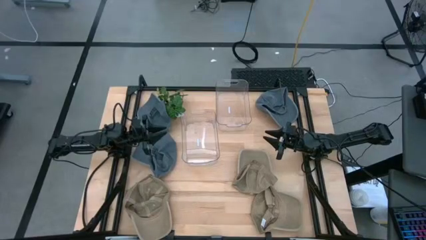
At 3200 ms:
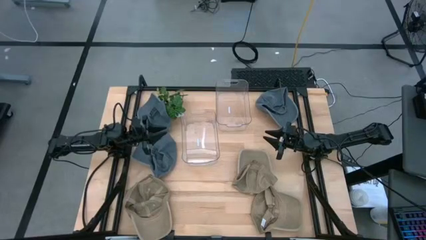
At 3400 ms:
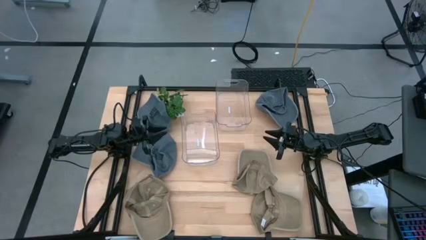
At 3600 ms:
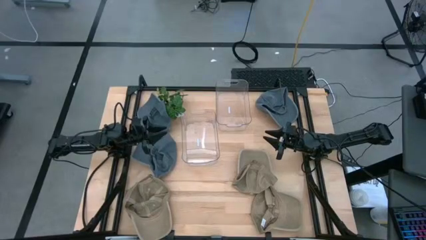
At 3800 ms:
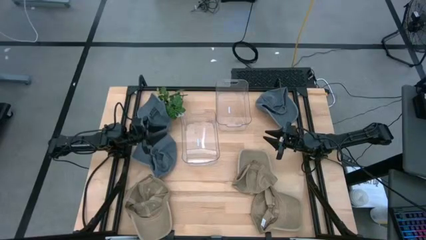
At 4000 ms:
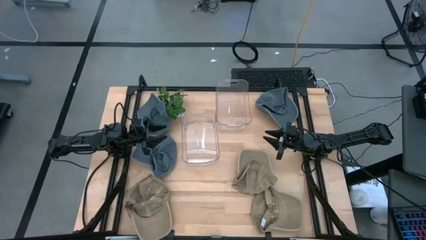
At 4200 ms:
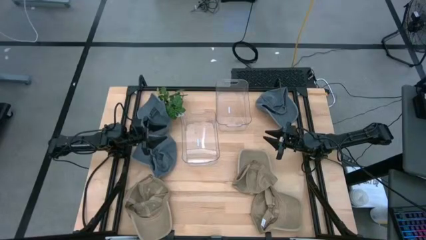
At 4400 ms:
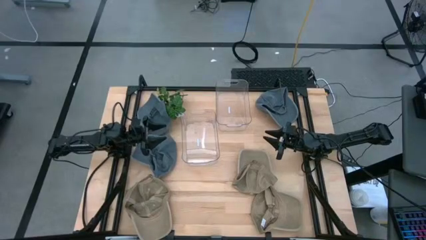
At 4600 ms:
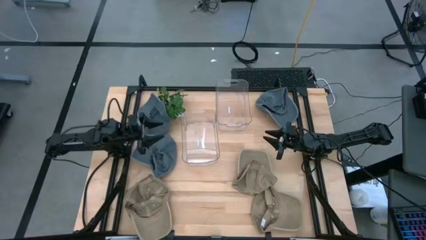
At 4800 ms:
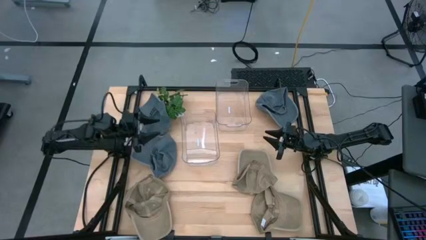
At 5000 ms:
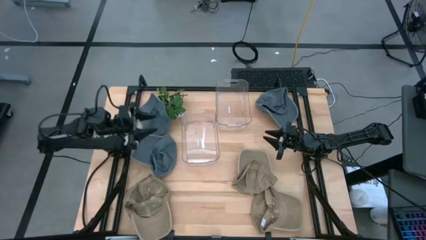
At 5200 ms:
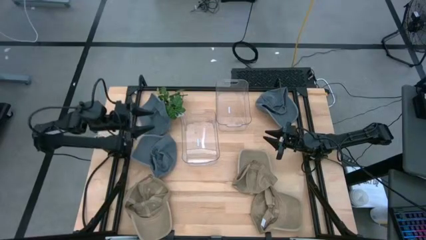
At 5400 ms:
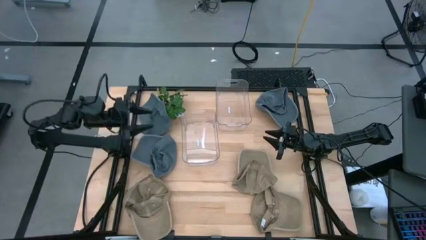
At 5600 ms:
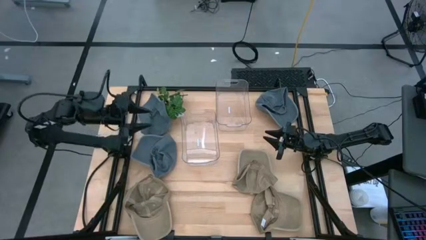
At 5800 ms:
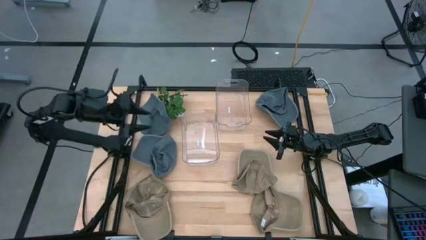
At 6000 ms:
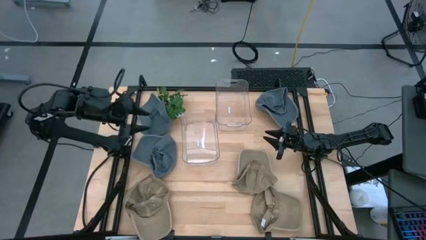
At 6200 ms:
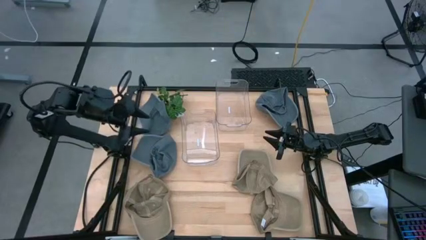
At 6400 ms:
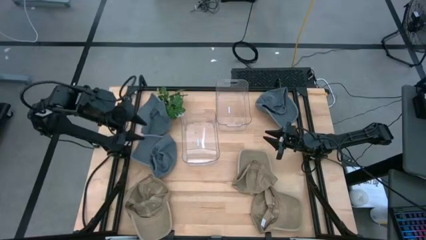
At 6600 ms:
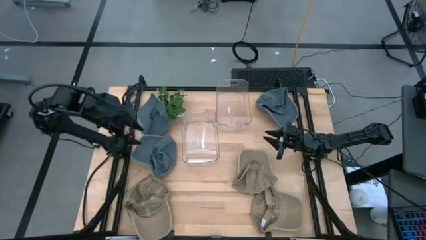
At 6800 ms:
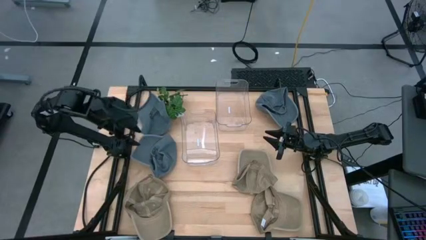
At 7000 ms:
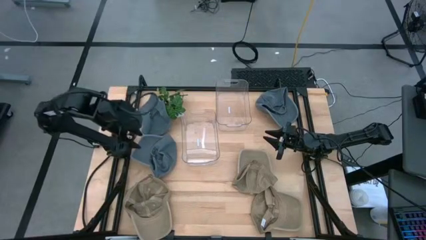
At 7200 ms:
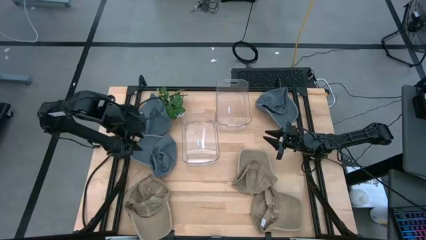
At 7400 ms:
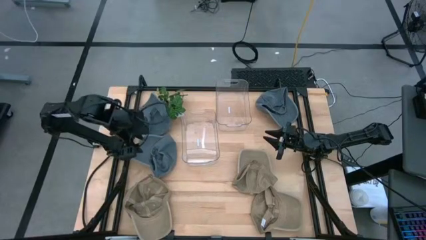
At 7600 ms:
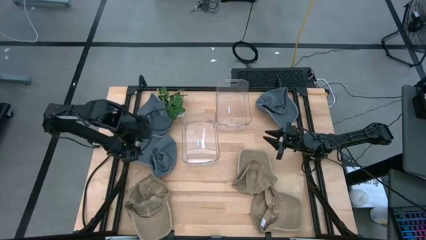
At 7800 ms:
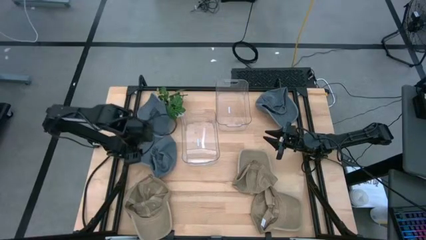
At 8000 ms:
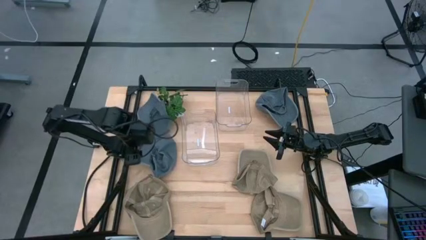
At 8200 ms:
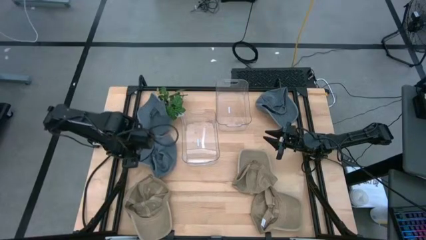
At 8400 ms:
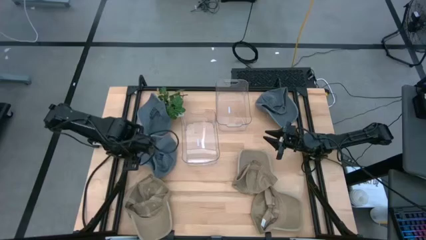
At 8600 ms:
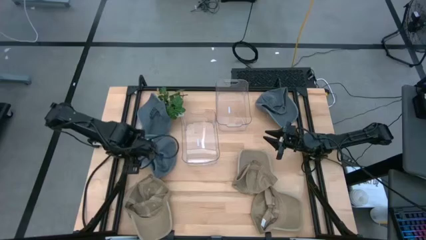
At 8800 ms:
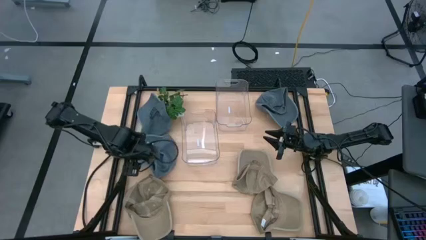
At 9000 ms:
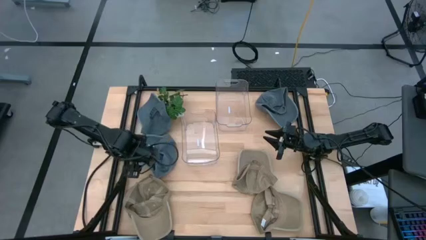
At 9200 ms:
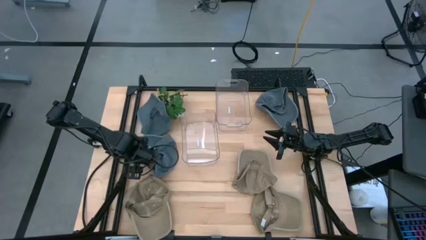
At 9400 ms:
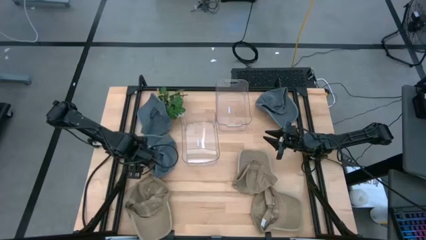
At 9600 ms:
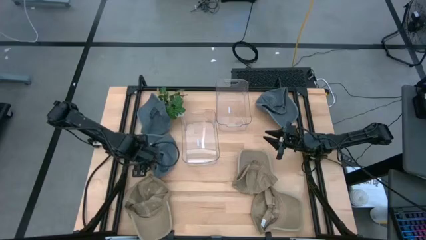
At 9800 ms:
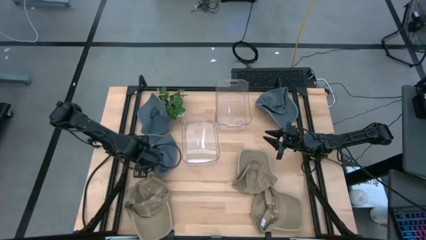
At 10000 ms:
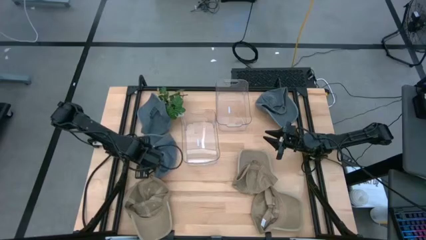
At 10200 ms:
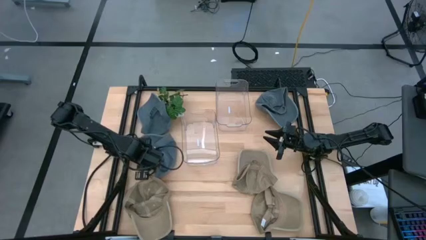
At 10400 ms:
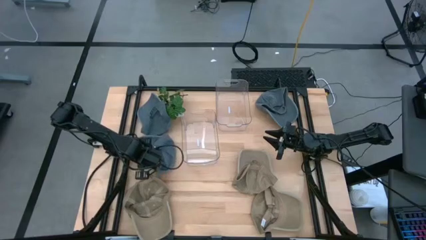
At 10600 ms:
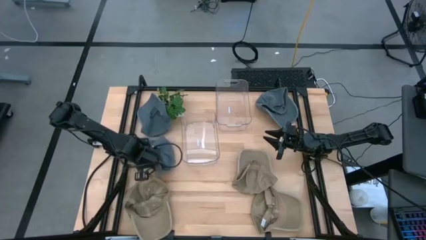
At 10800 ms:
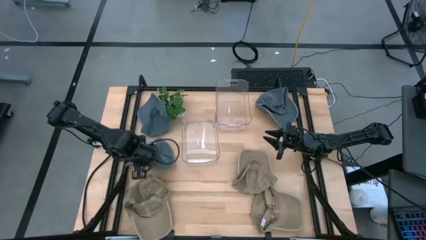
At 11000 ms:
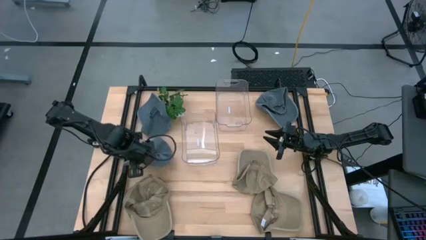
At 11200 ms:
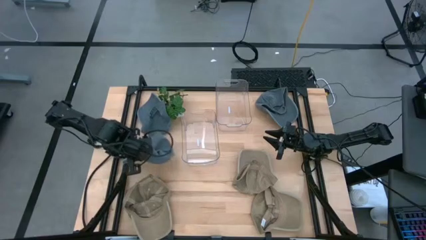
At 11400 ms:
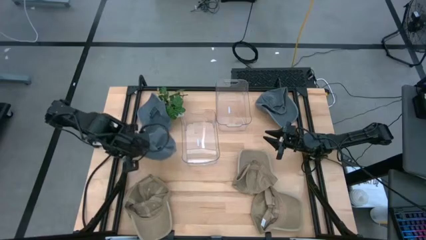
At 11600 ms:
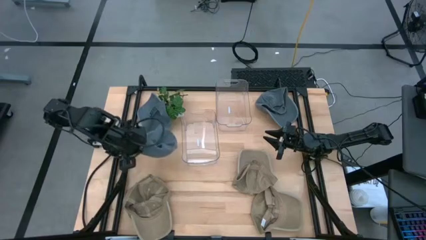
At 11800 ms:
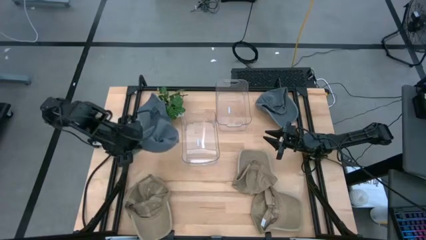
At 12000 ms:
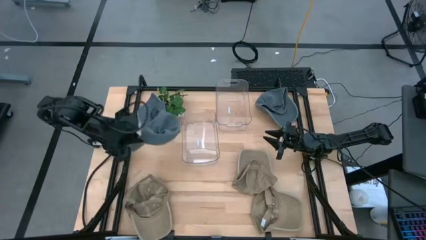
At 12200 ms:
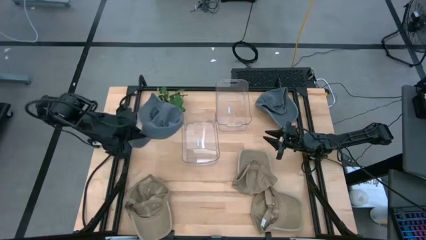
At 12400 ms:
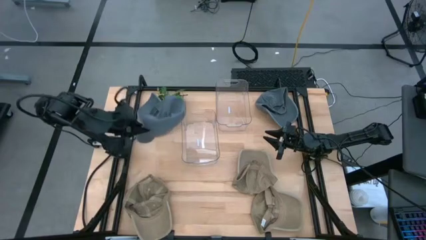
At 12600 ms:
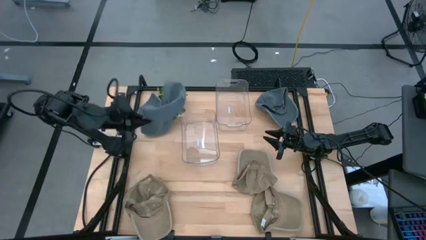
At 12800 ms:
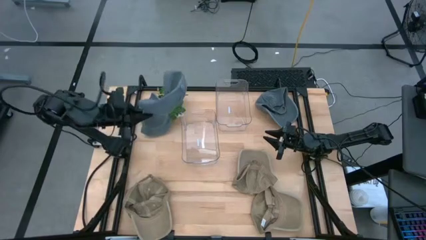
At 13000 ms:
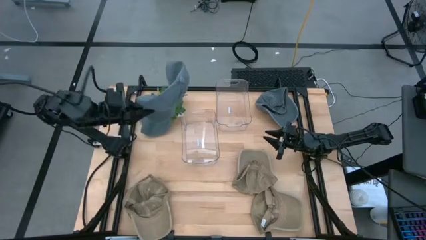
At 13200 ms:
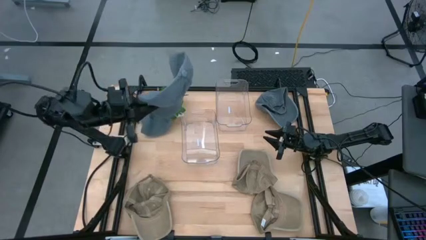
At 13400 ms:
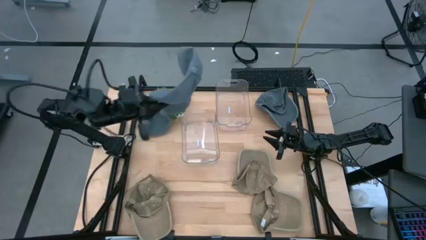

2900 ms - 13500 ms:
Task: Pick & Place hat
Put the bottom ash blue cap into the right transparent bin

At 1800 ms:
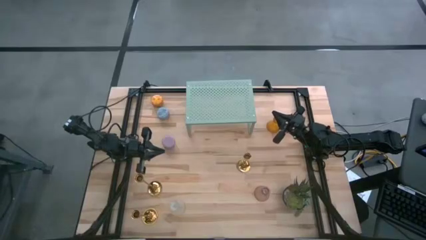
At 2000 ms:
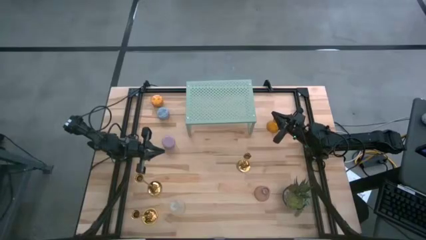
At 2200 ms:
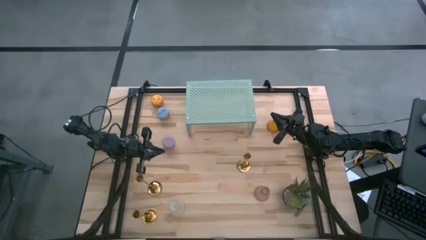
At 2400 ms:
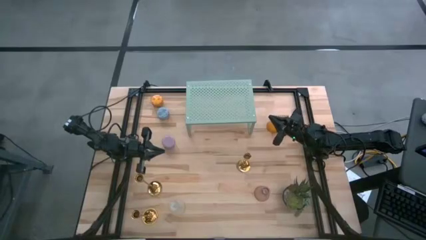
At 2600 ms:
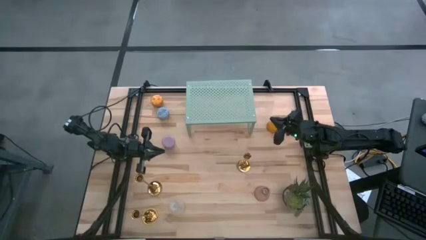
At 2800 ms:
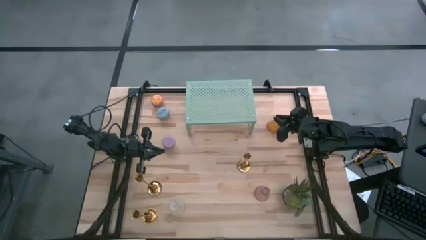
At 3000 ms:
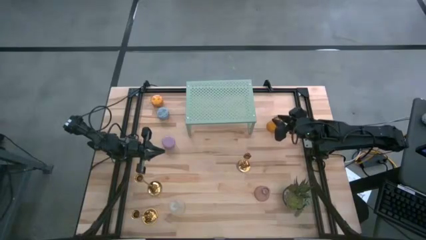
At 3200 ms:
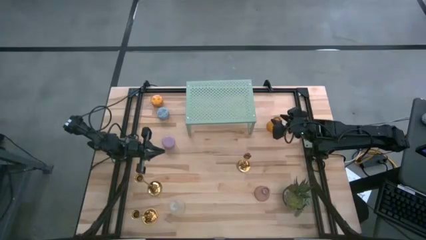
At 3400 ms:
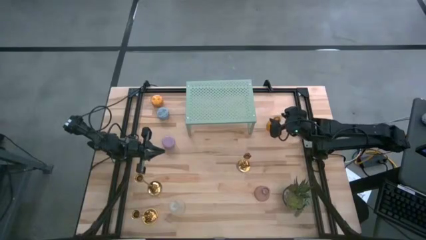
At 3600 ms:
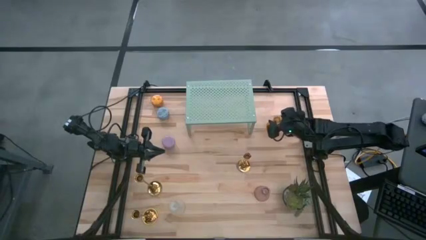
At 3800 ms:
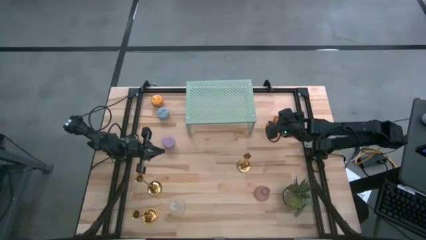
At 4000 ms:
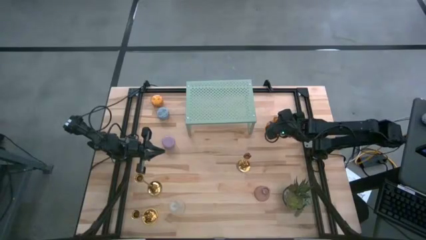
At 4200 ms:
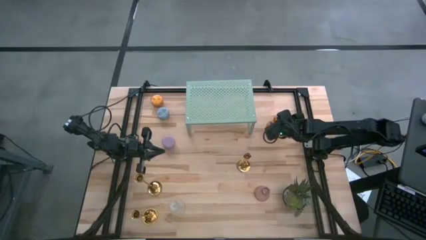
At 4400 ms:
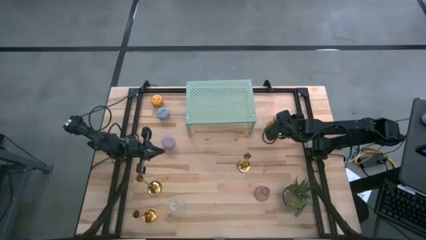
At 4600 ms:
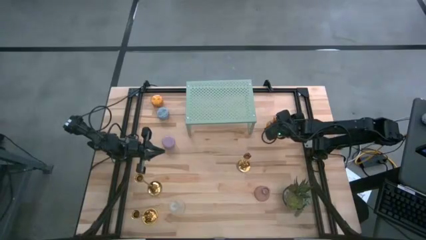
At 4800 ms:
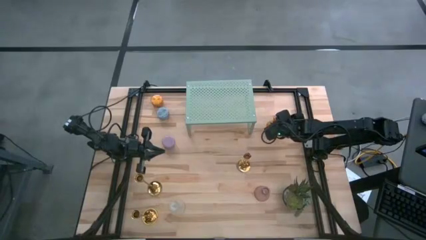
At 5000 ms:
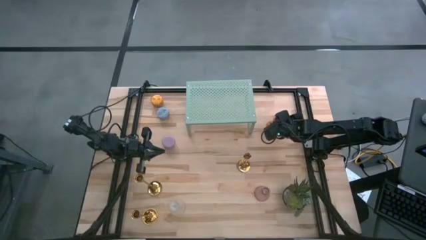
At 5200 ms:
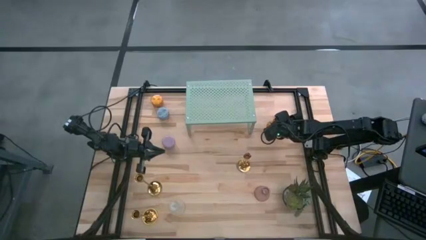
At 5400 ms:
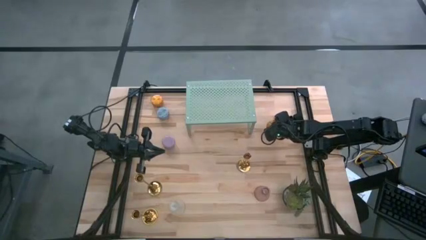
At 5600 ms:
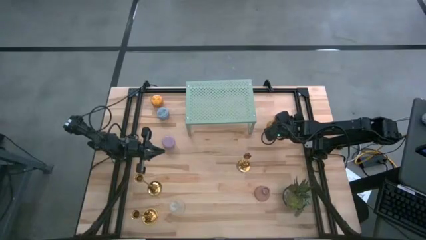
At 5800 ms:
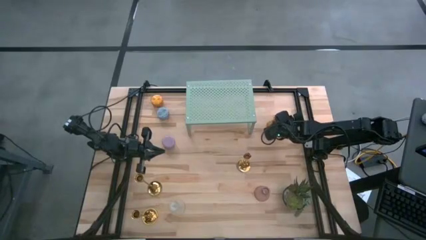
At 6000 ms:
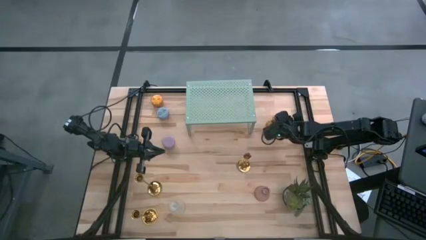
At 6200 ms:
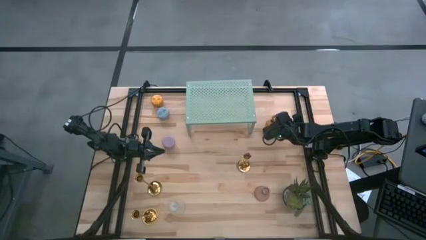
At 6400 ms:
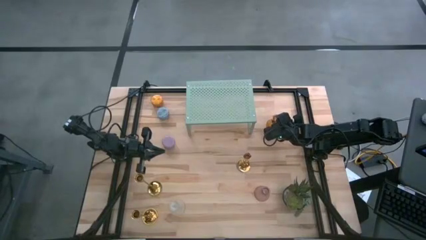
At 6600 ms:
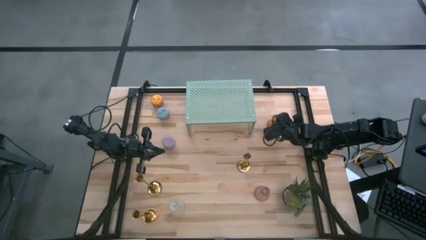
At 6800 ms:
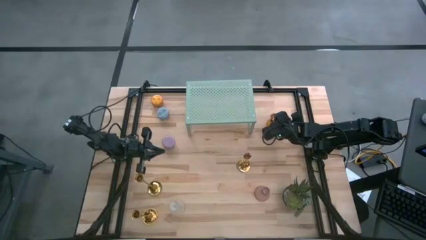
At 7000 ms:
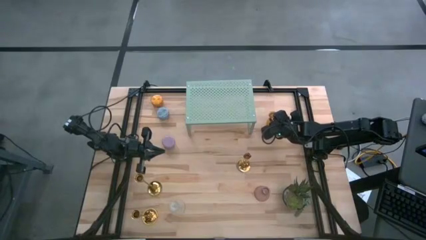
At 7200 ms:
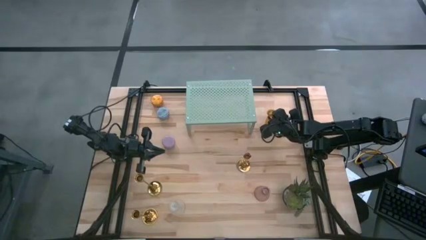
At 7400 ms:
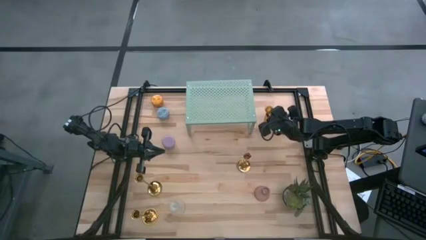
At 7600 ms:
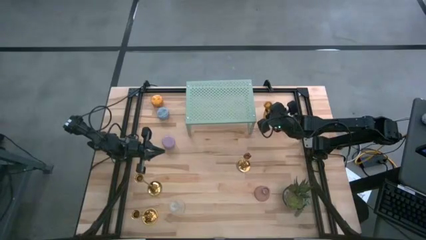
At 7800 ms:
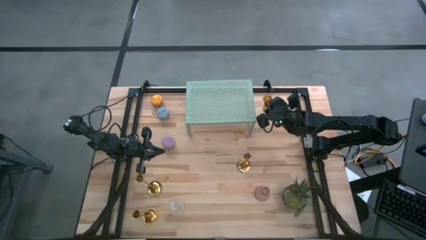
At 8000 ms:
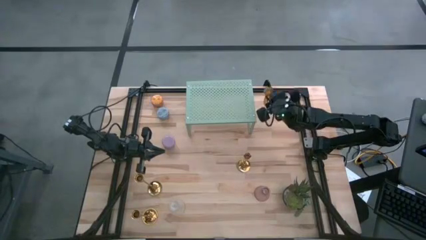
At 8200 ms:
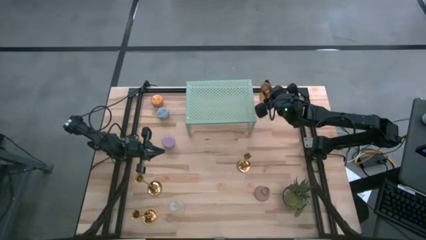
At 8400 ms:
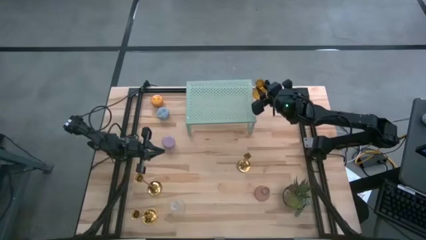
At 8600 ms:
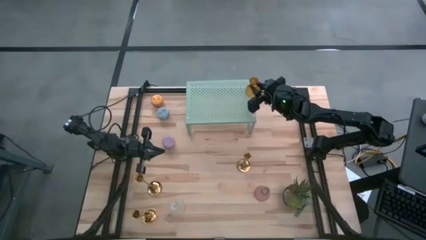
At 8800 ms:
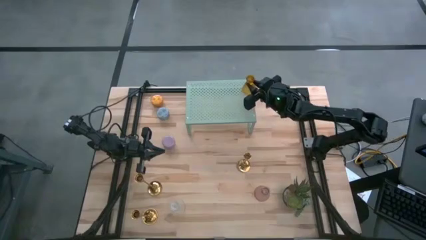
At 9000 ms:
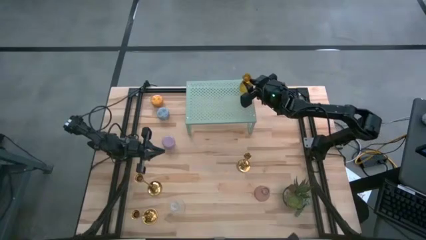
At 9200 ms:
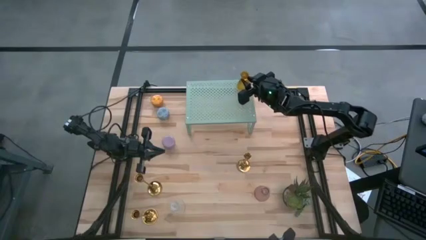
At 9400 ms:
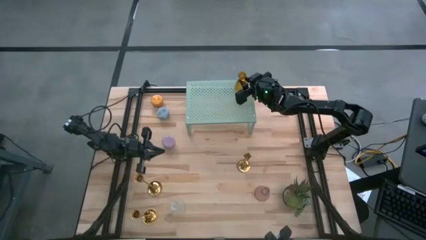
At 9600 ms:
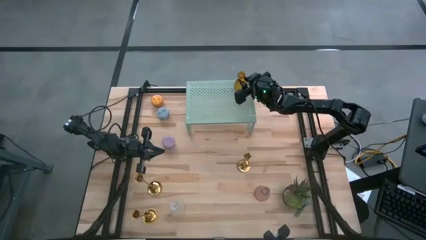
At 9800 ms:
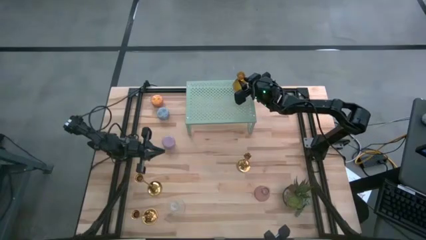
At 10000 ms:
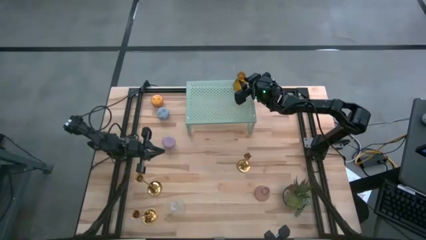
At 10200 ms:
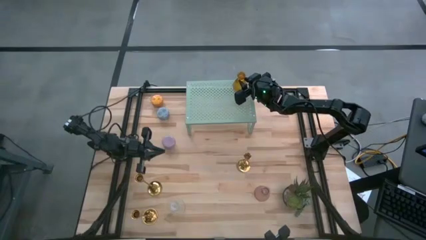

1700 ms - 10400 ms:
Task: Pick & Place candle stick holders
Put the yellow candle holder on the shelf
